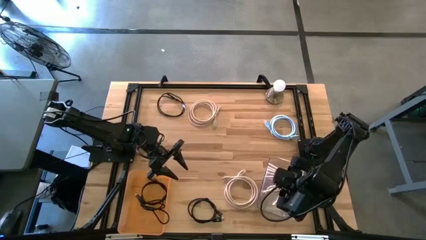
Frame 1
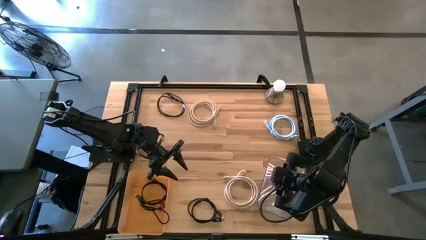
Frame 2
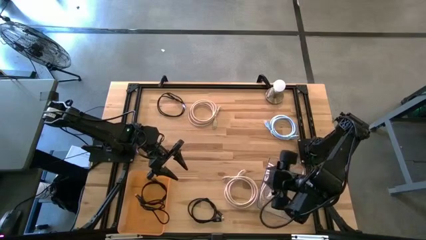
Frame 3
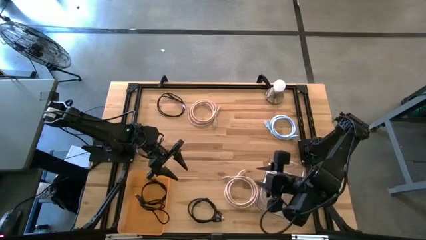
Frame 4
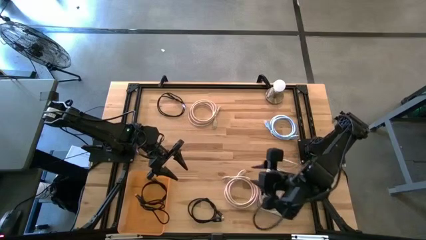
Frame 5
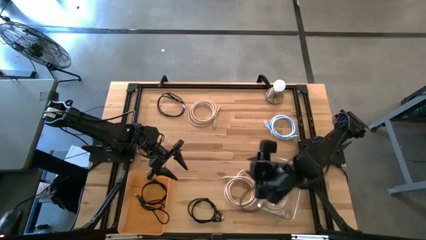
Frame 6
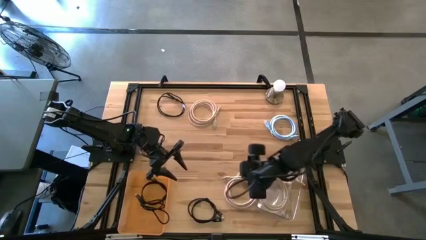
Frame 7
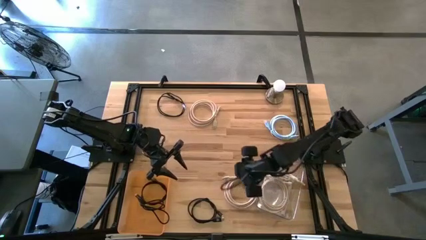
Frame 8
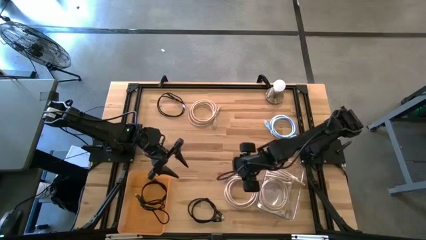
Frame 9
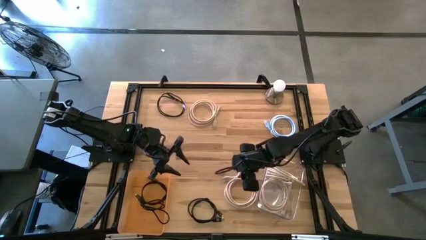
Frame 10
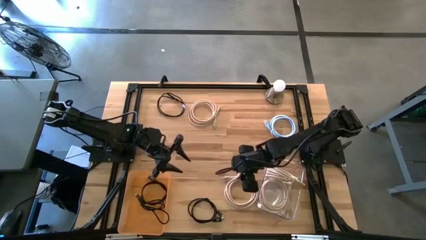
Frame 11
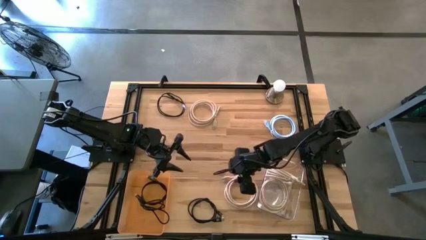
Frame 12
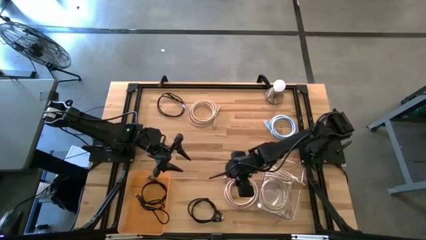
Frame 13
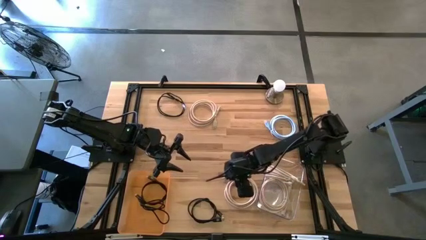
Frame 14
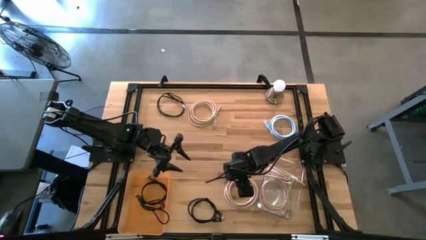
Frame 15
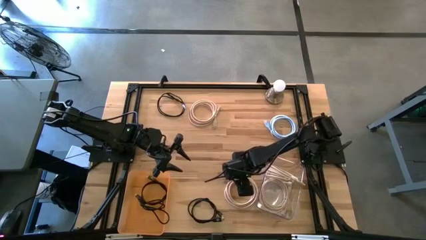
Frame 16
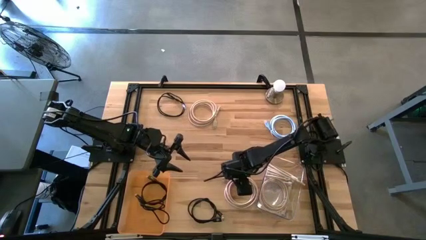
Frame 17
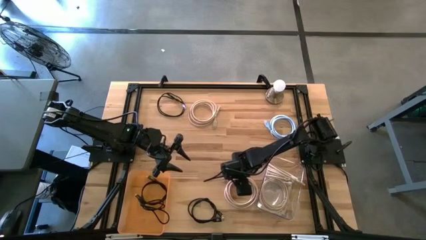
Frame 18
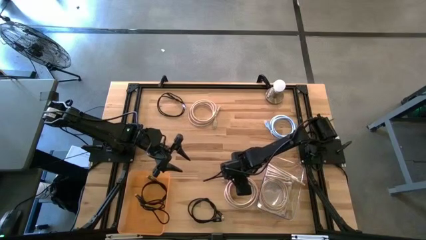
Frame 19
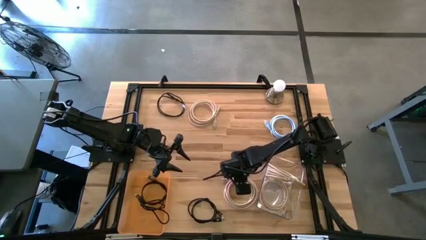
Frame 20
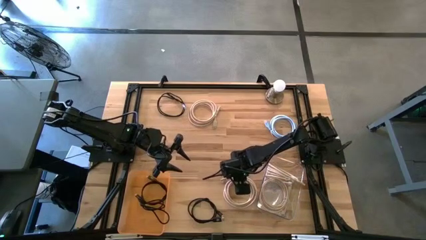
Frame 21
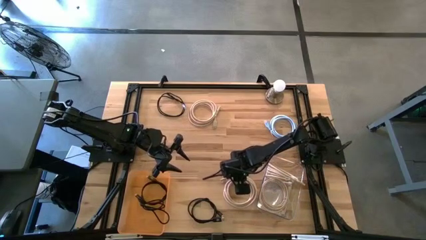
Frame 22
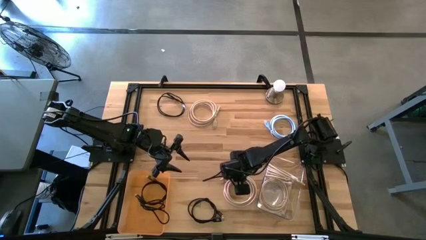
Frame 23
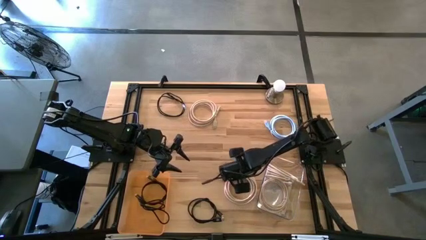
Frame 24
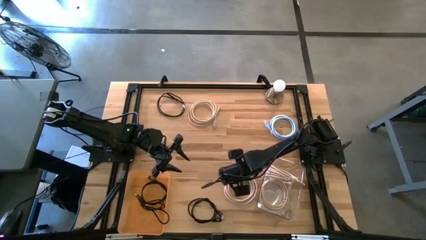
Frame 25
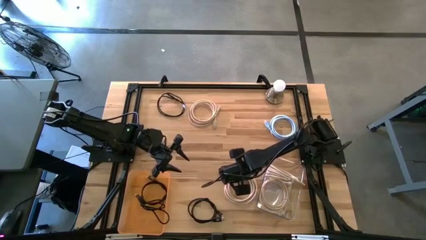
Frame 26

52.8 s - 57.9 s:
Task: Sort HDMI cables
Put the white HDMI cable into the transparent bin

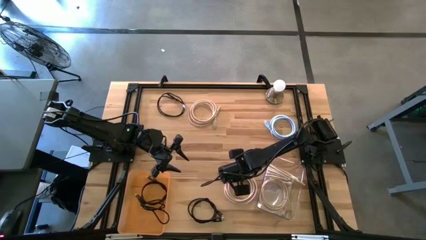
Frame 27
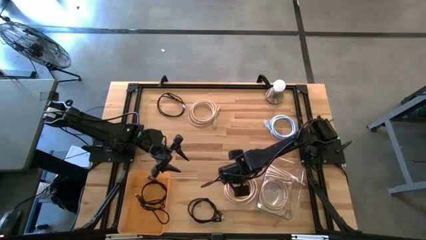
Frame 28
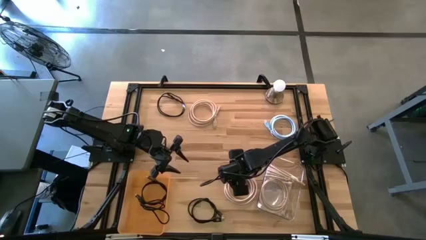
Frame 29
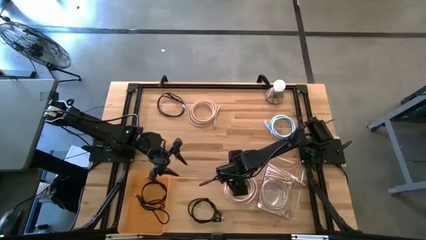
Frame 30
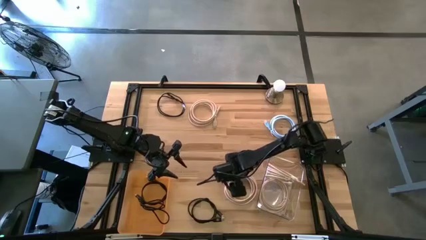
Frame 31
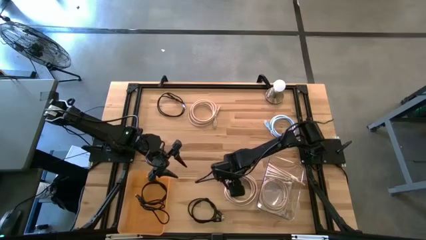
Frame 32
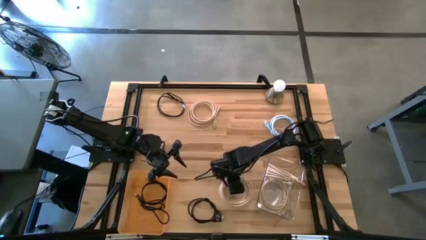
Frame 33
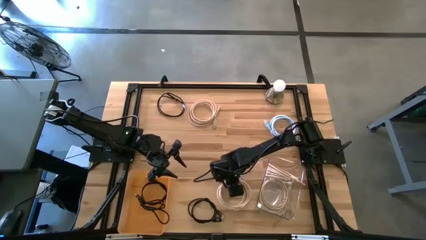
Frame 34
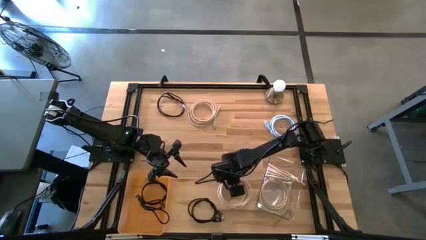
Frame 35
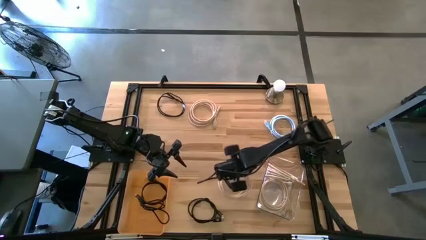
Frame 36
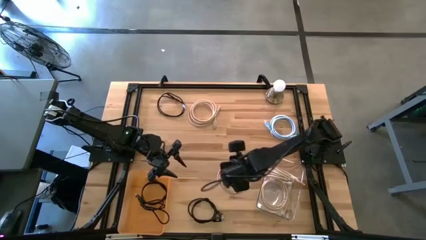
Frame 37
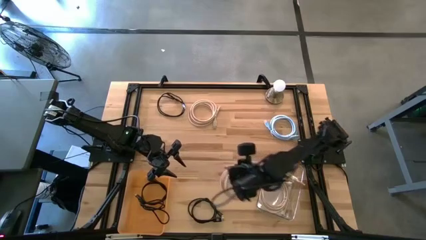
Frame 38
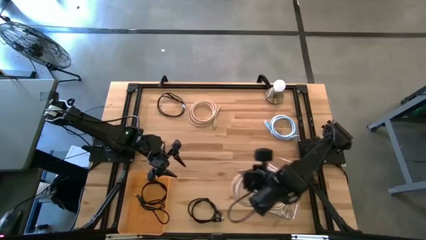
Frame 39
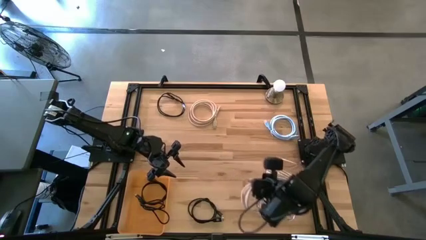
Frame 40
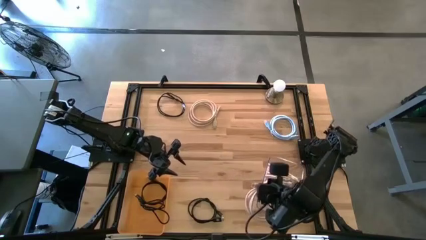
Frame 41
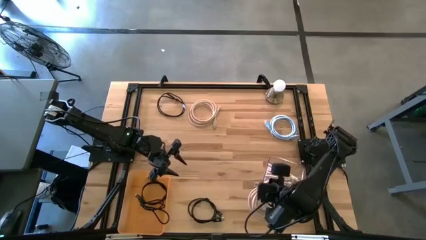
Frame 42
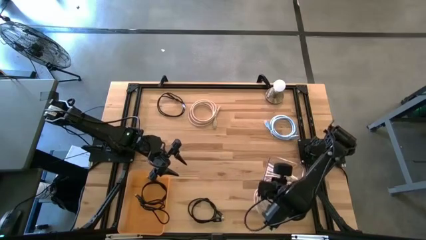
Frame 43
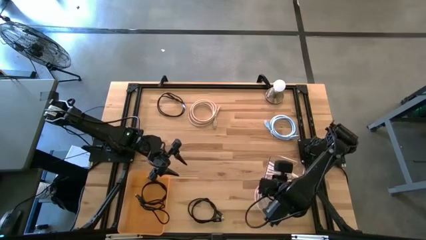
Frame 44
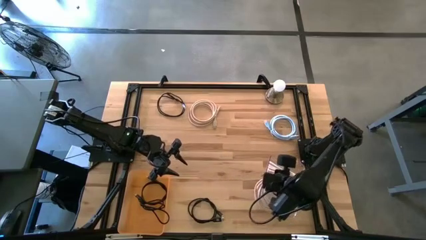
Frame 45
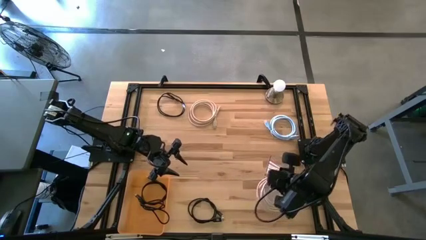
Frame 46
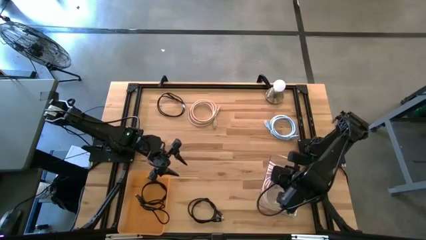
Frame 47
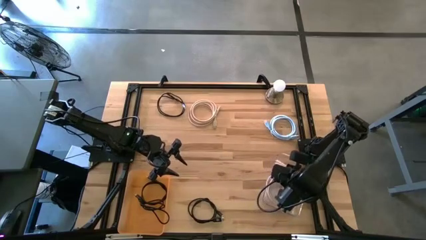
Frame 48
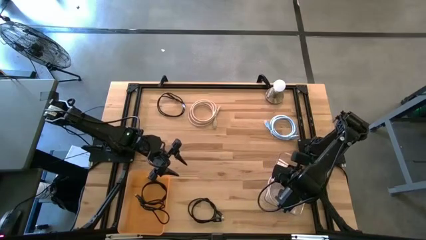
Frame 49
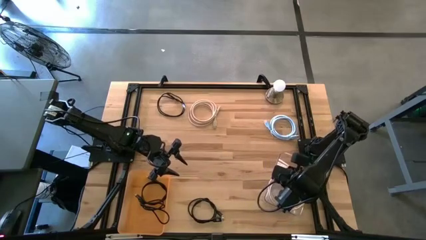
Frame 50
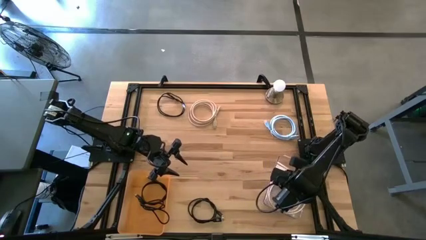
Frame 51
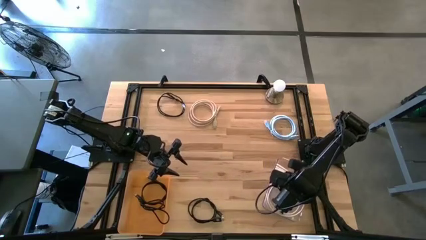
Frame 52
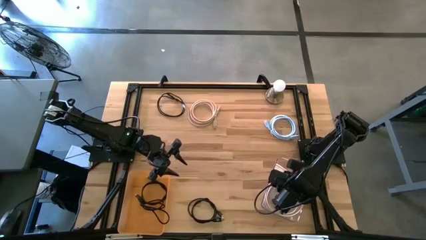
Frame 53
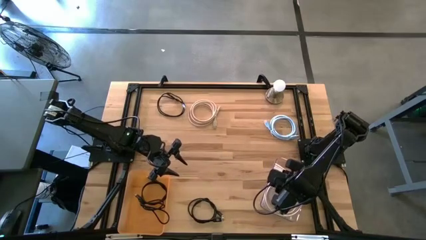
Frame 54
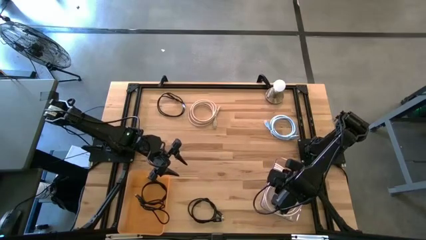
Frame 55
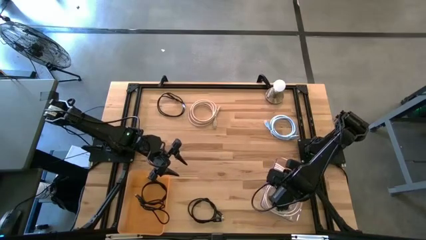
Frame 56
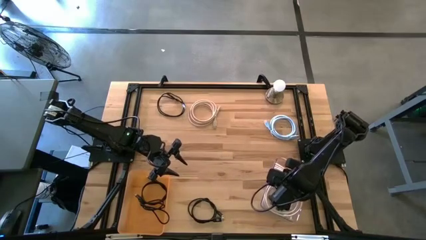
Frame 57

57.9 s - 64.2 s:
Put the white HDMI cable into the transparent bin

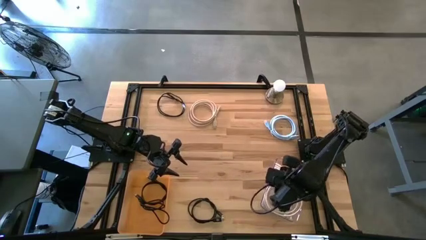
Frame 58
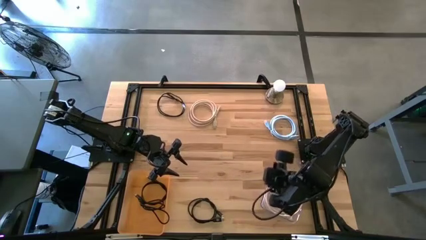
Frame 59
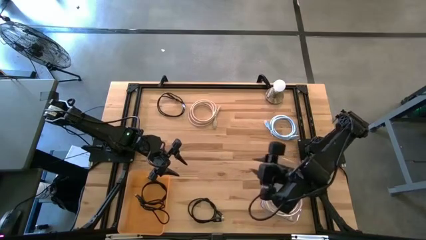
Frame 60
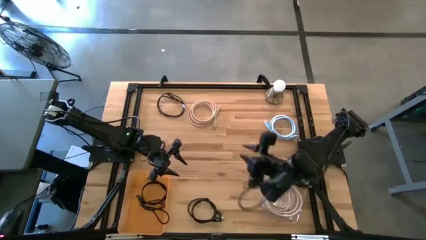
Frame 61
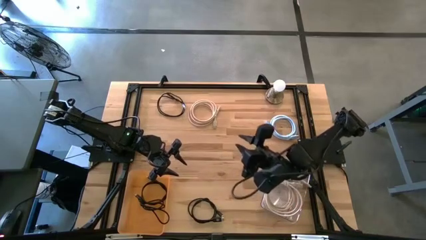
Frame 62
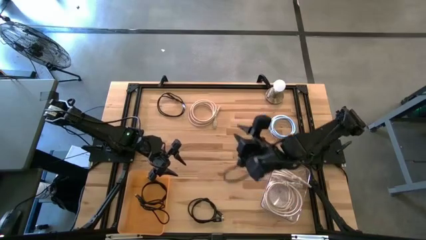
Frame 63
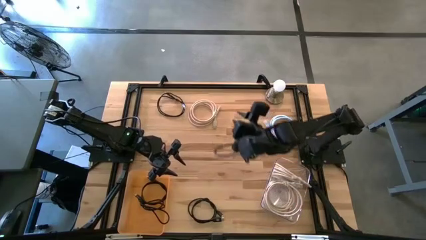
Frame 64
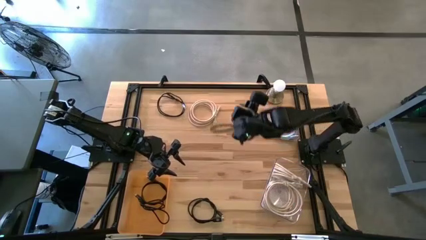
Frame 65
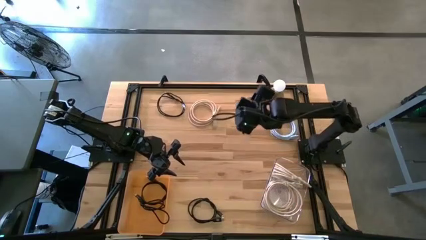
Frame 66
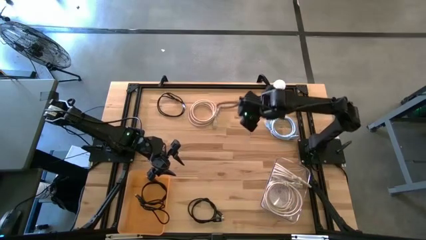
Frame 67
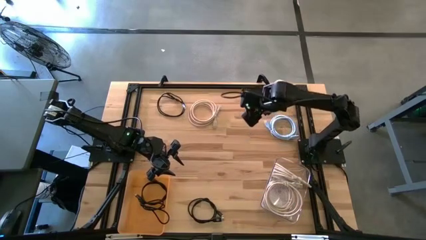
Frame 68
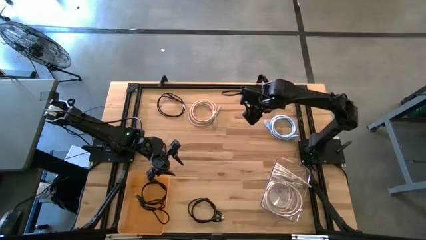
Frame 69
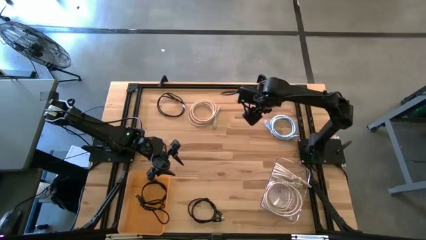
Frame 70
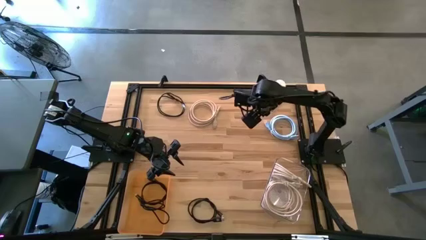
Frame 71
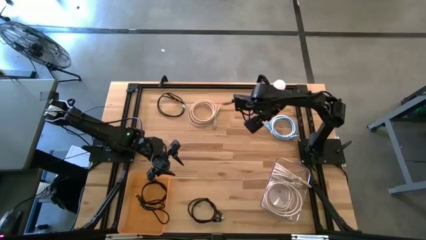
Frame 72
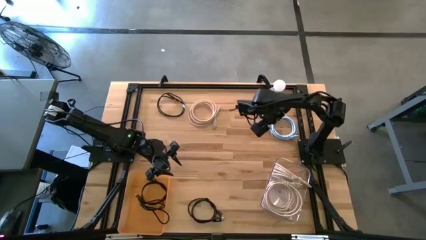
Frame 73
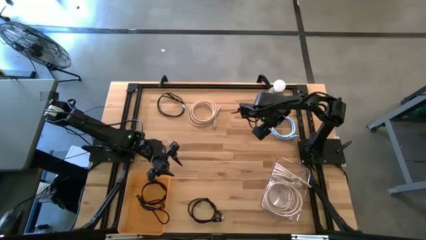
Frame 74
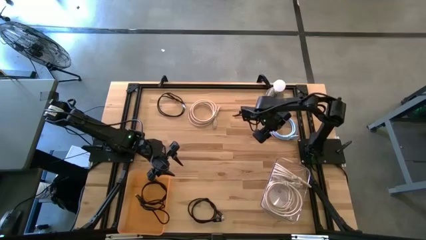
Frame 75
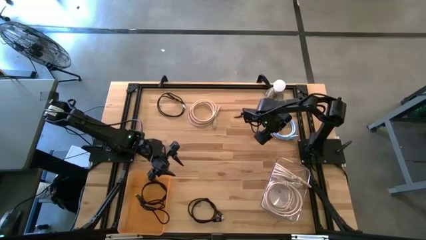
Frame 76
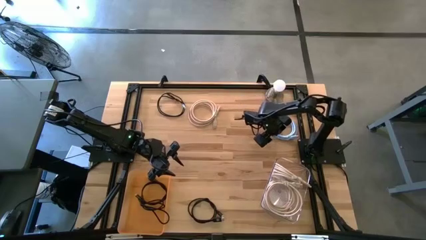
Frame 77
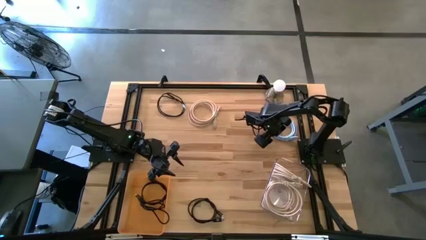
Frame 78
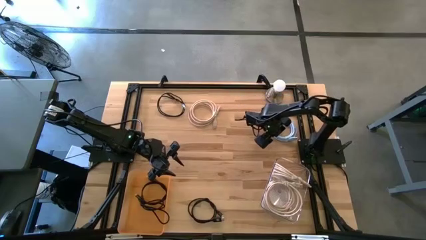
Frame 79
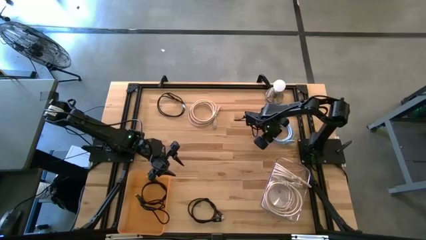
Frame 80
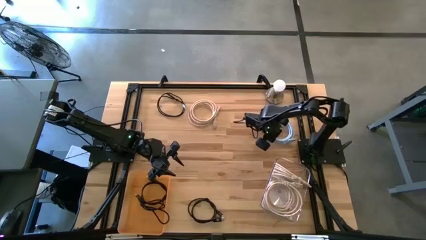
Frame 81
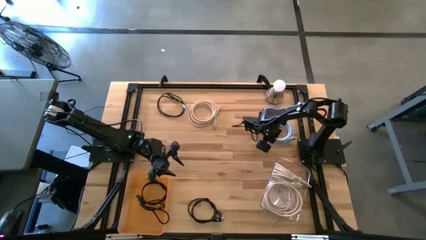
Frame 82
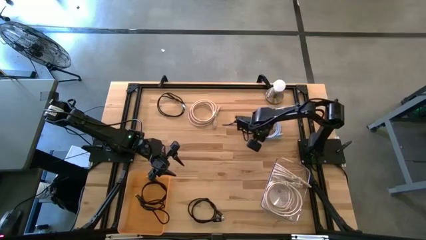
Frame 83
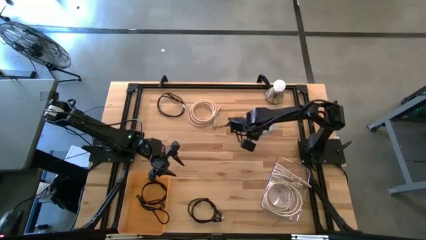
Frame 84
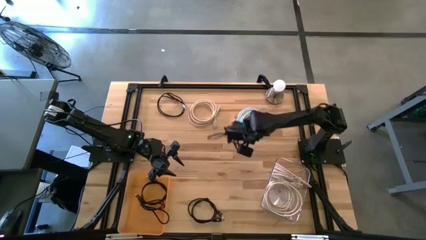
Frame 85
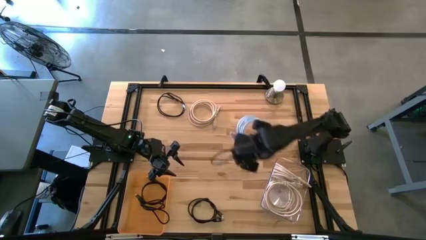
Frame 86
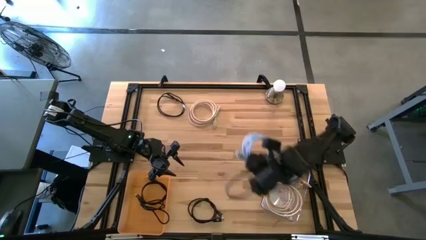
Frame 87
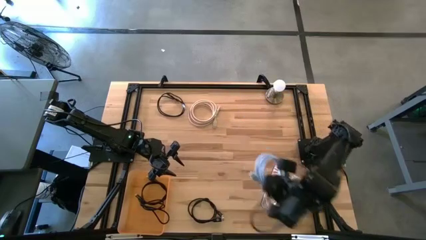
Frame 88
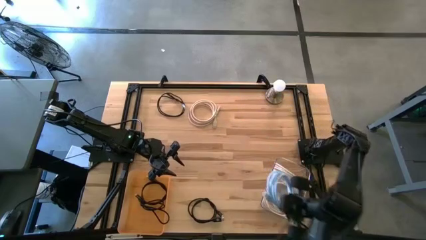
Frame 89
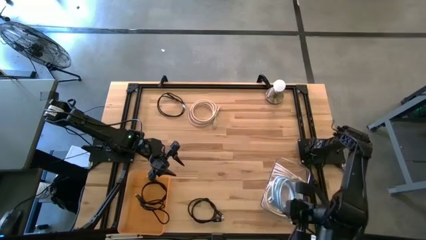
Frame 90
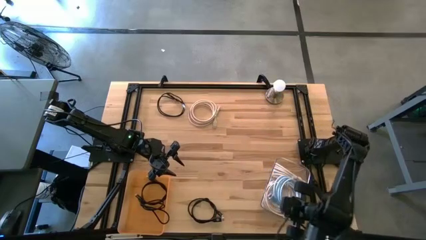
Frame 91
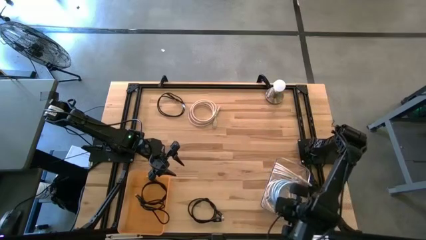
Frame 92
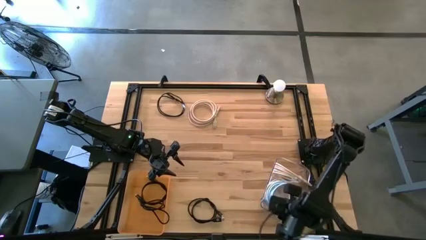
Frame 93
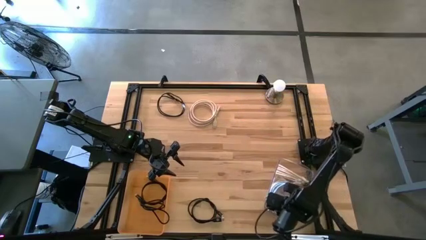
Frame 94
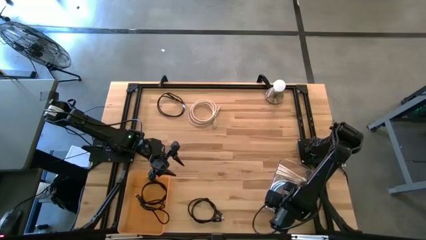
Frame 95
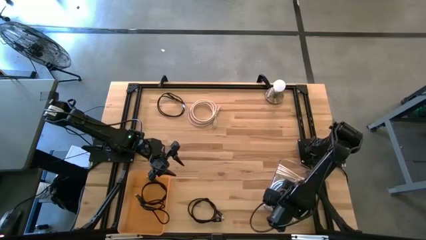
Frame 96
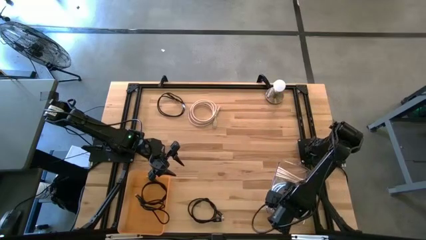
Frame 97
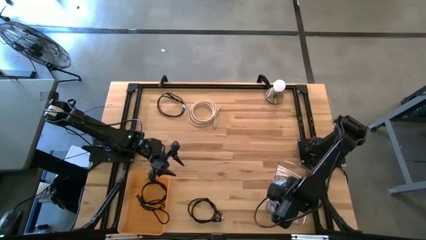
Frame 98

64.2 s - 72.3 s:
Put the blue HDMI cable into the transparent bin
